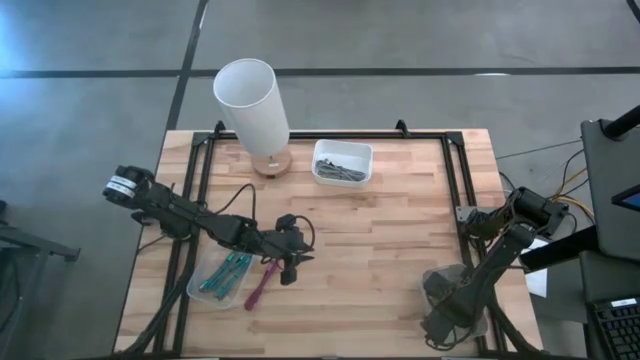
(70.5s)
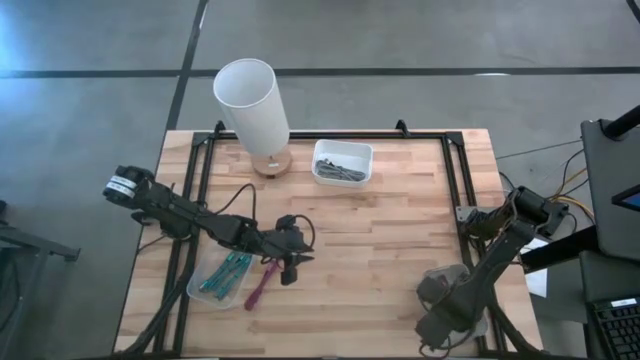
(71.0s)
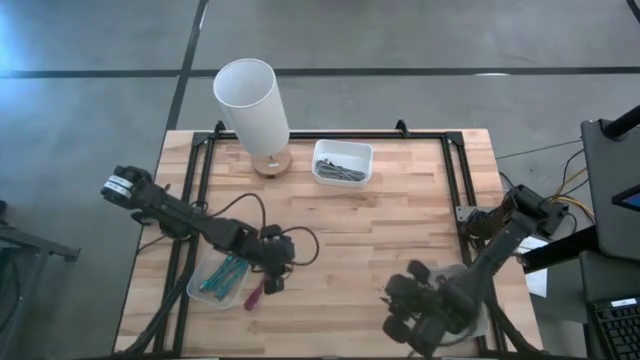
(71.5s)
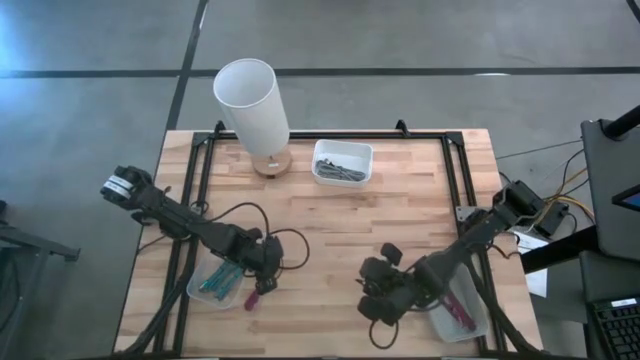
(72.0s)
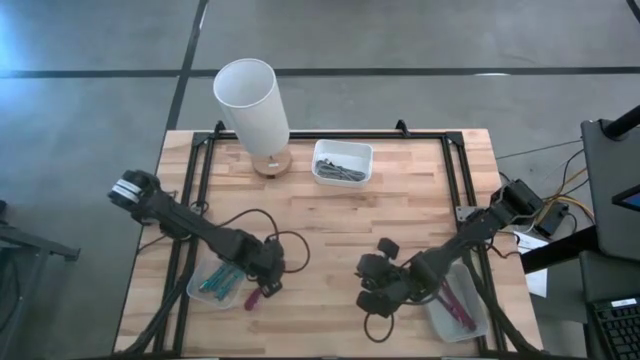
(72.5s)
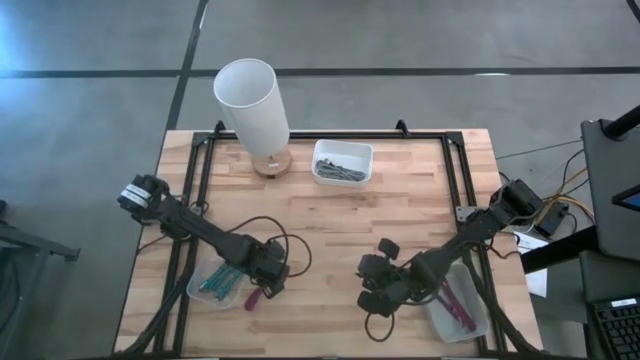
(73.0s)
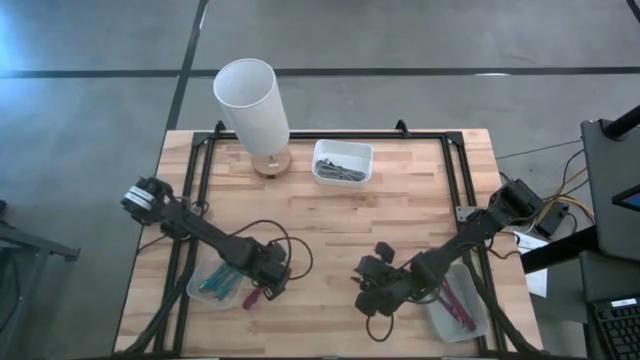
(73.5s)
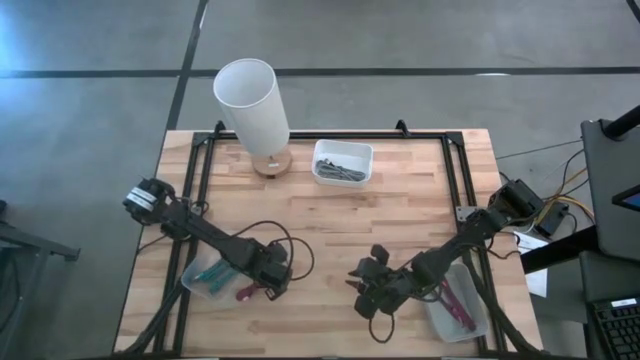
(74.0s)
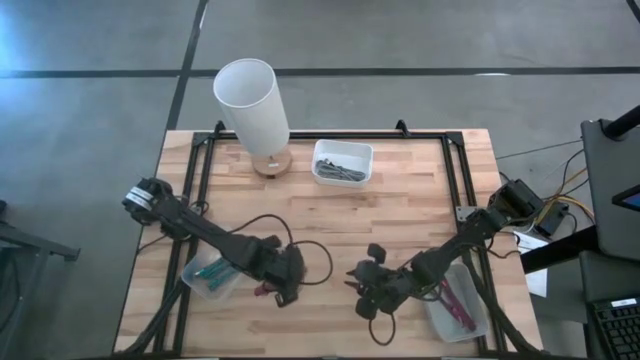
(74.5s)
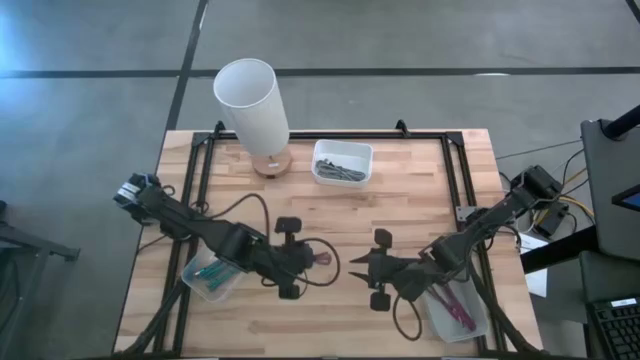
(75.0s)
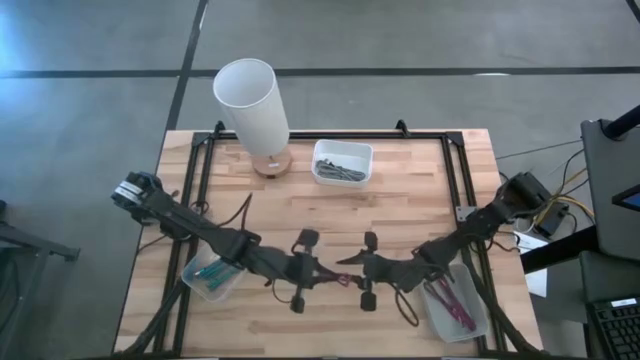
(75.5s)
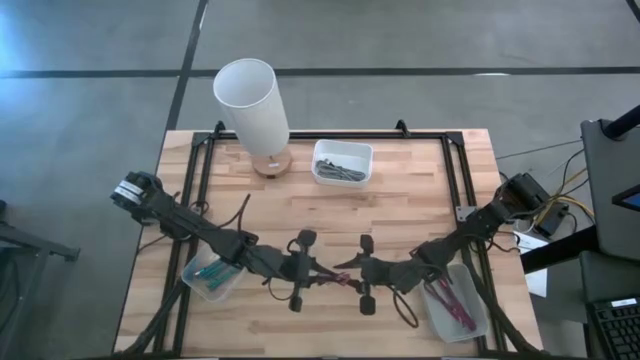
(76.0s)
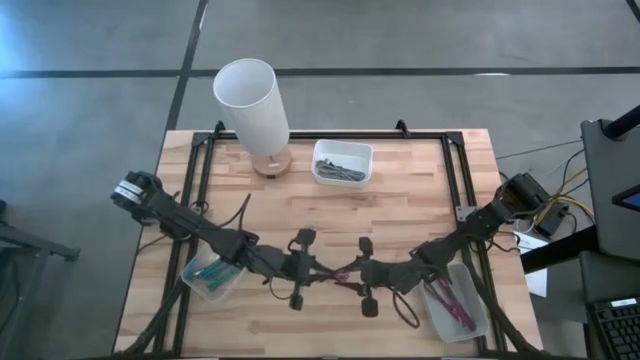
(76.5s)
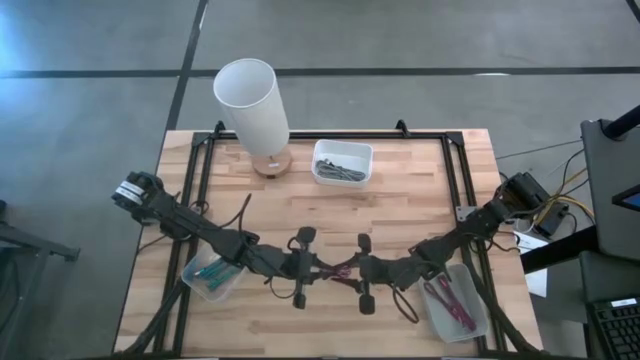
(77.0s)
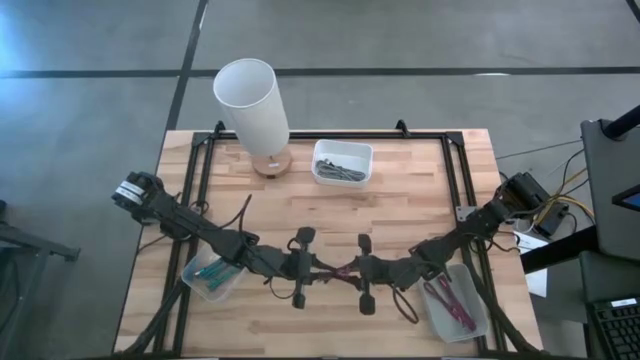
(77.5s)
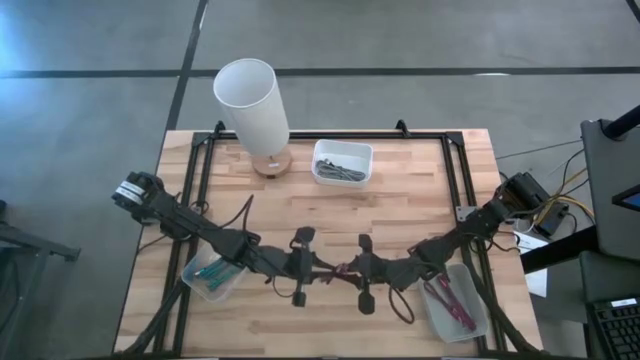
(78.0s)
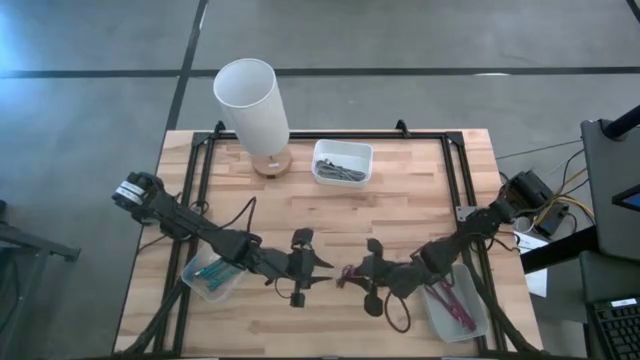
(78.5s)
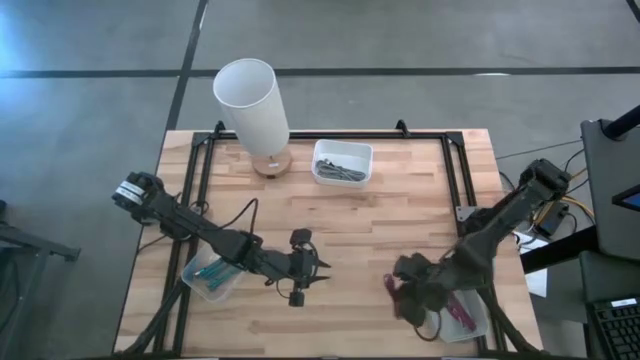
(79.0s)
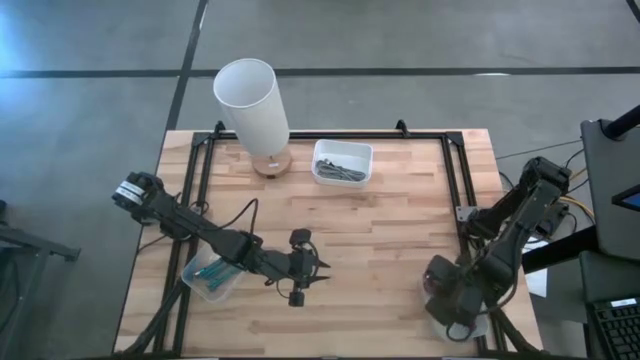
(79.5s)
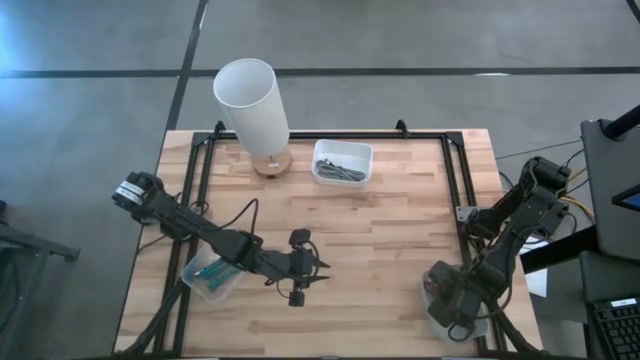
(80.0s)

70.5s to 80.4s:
Task: Pick & Place USB Port
Put the pink black charger cable into the grey bin

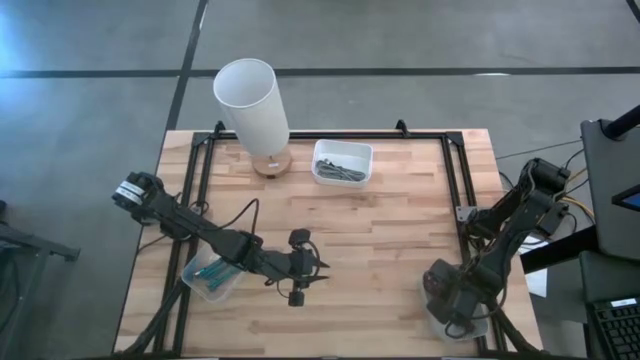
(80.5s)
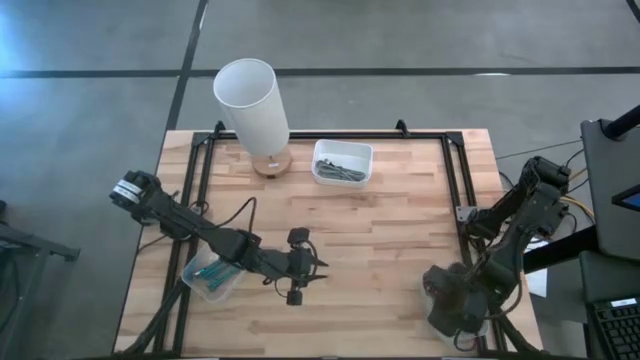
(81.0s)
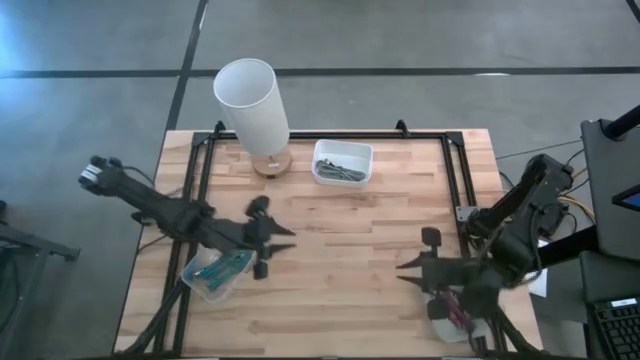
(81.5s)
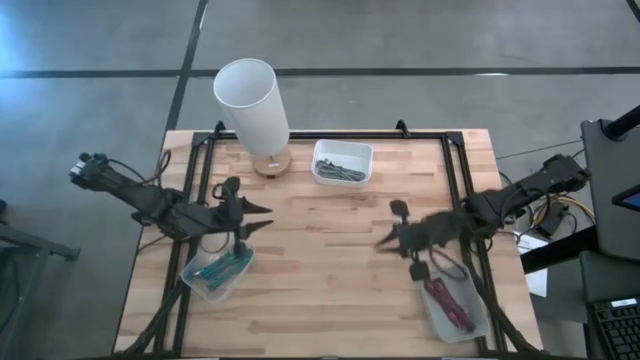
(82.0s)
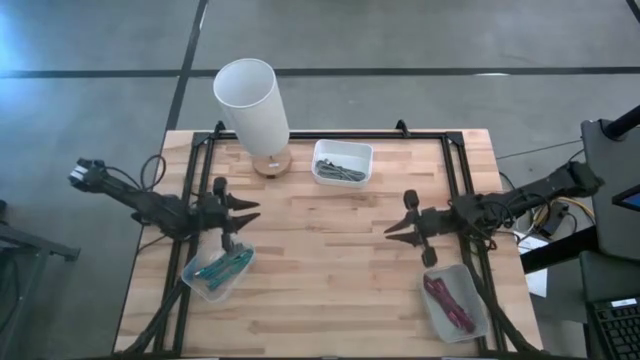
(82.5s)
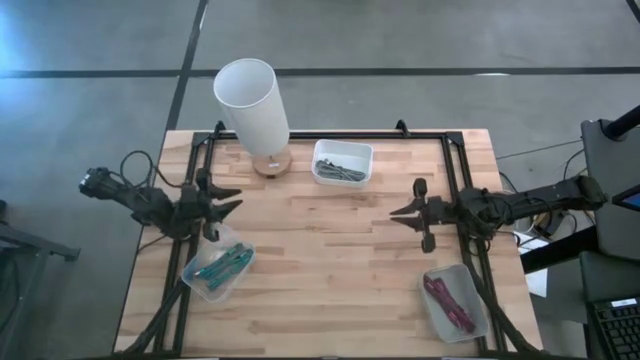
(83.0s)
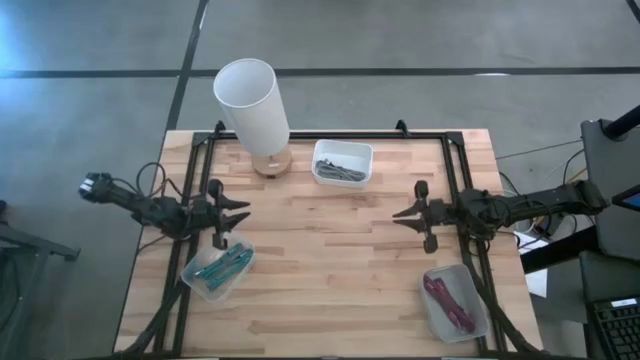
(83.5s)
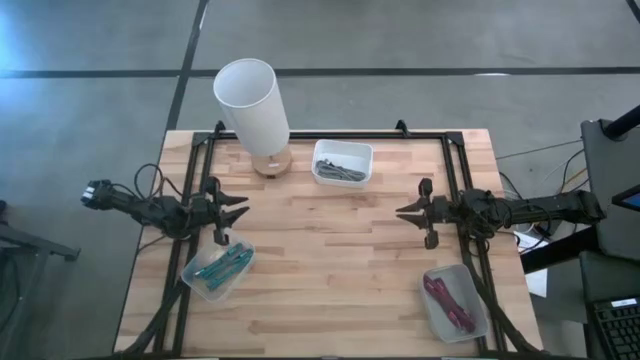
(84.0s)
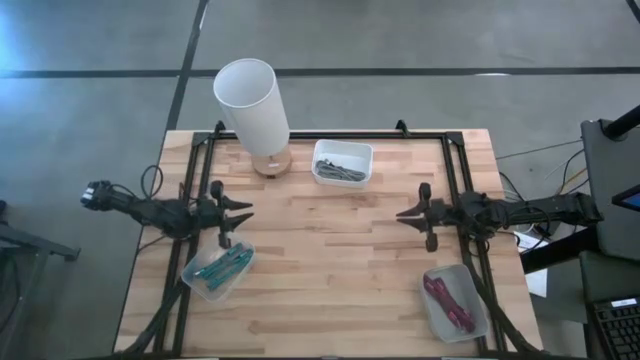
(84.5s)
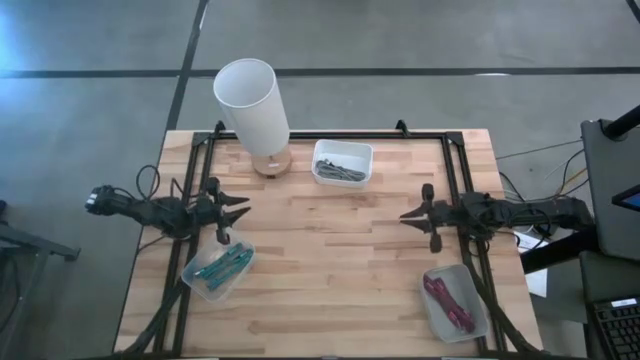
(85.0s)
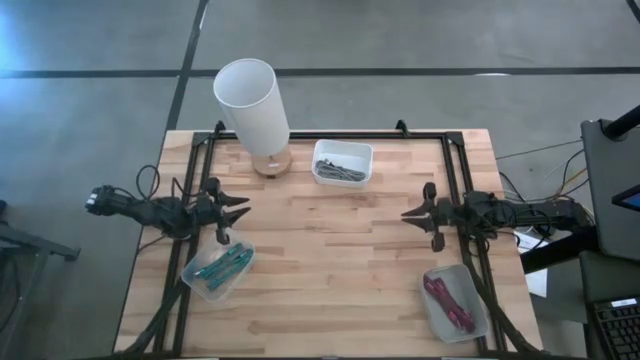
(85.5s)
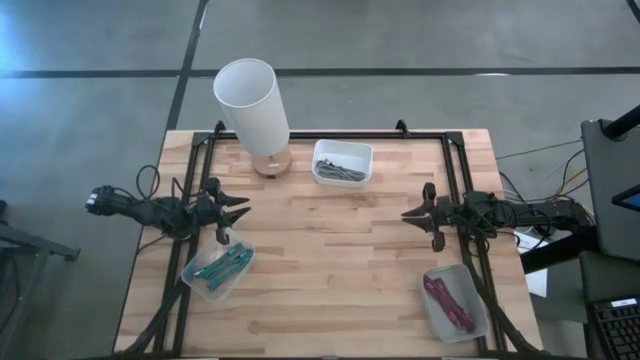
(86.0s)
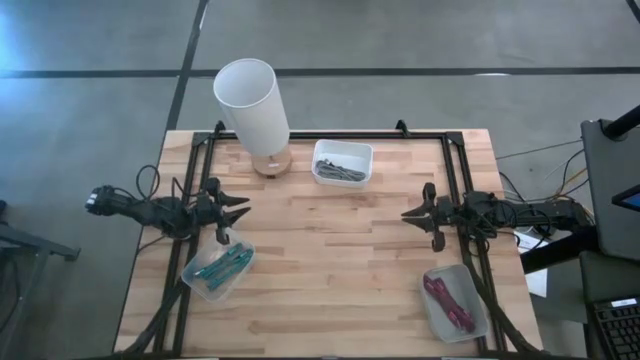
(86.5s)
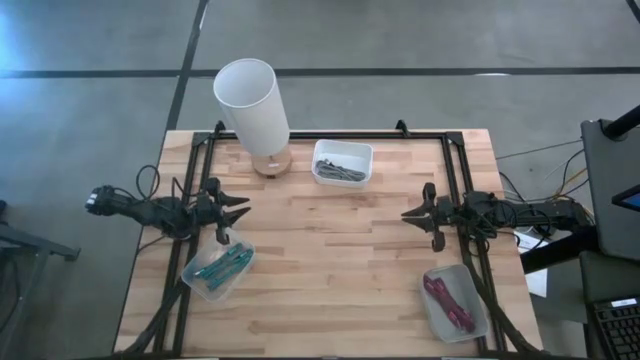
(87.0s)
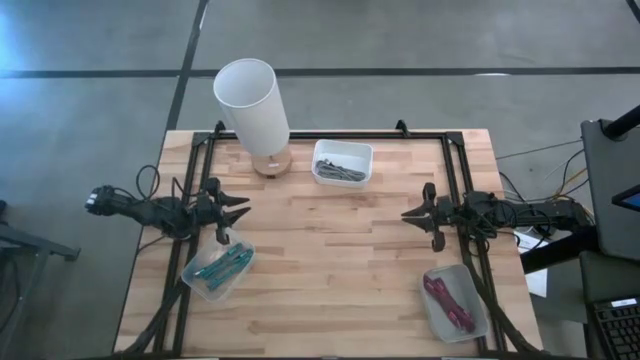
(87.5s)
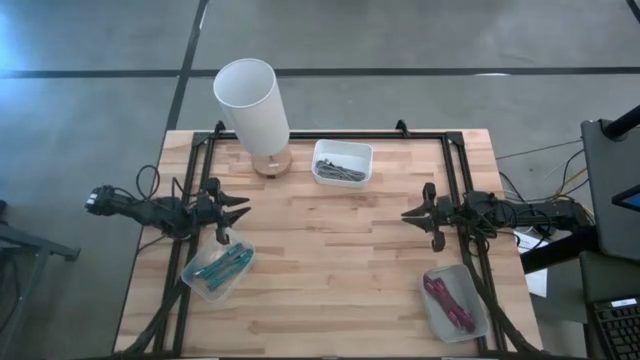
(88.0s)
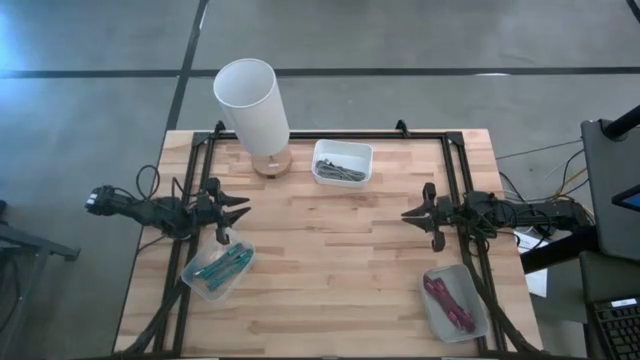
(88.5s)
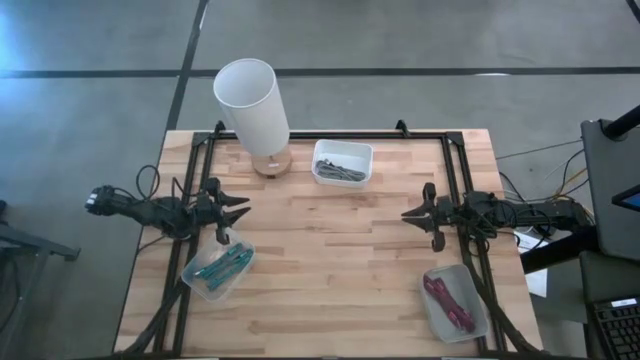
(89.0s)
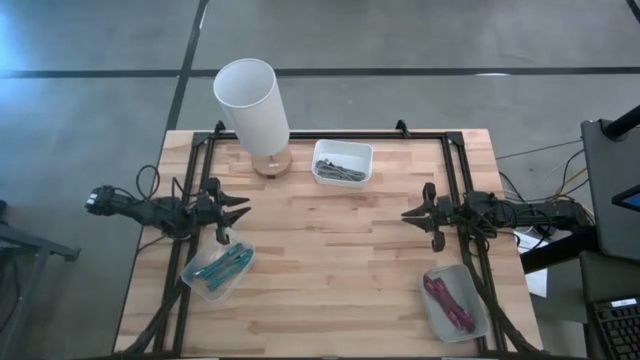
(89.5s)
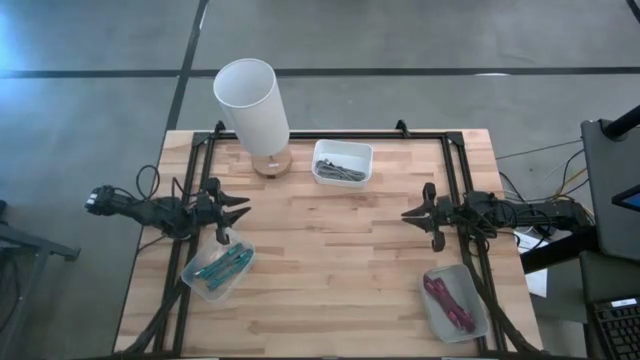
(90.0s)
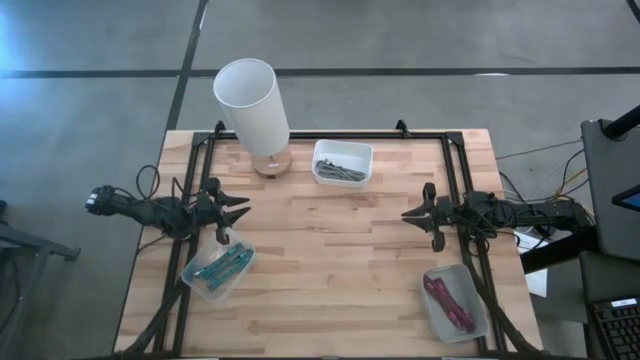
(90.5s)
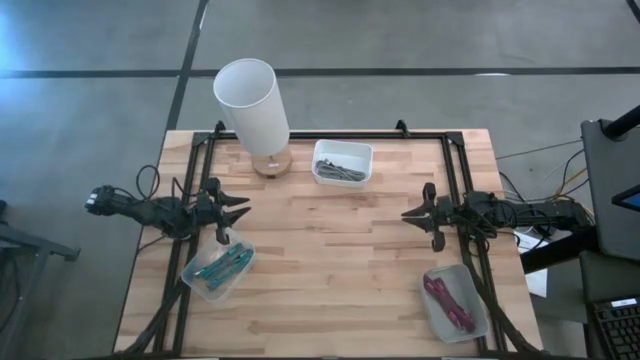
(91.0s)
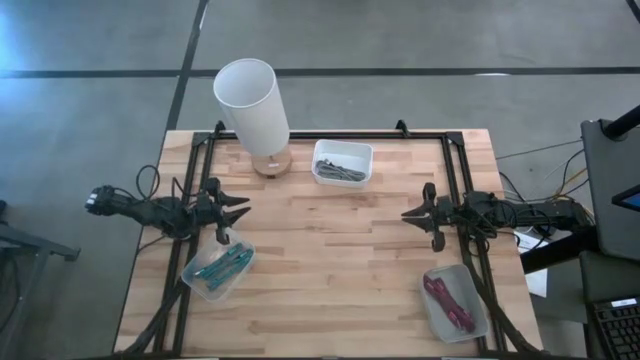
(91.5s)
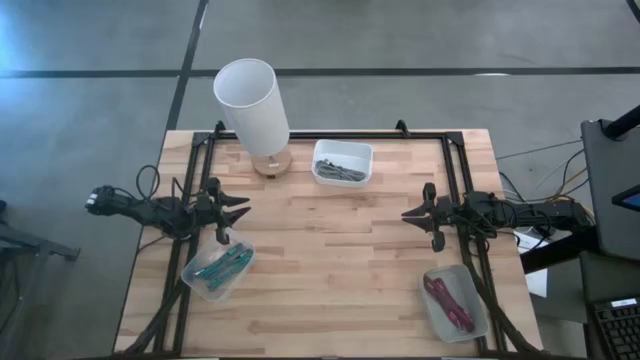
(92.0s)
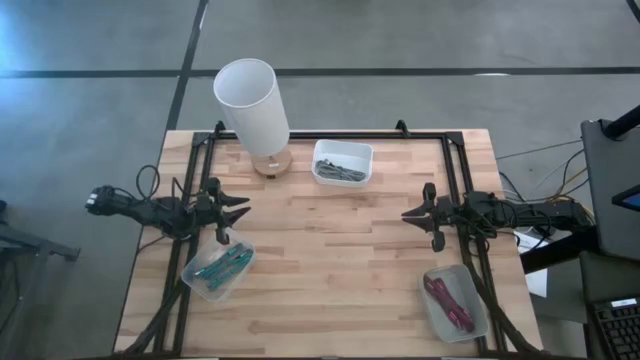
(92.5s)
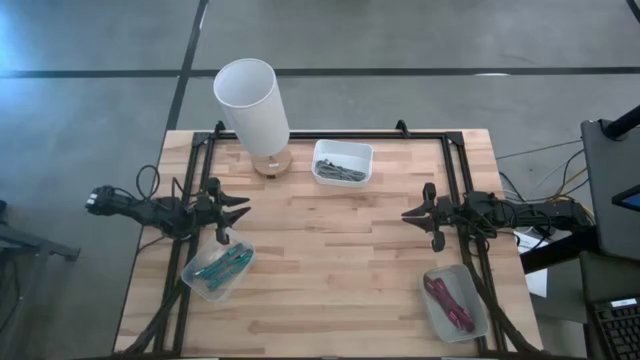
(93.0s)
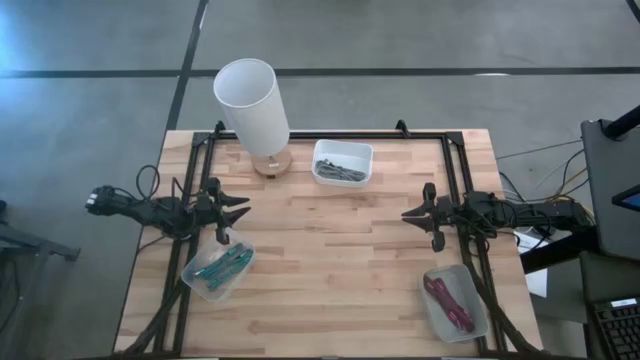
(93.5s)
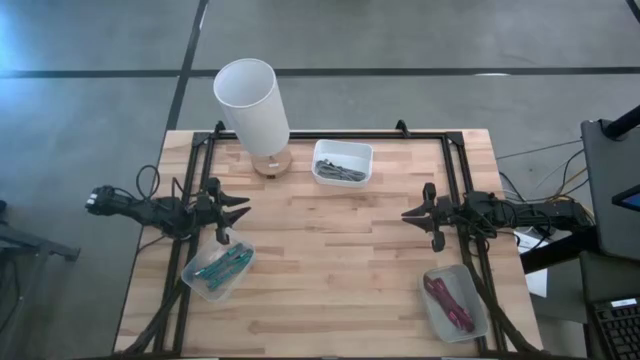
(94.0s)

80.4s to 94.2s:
Return to Home Position
